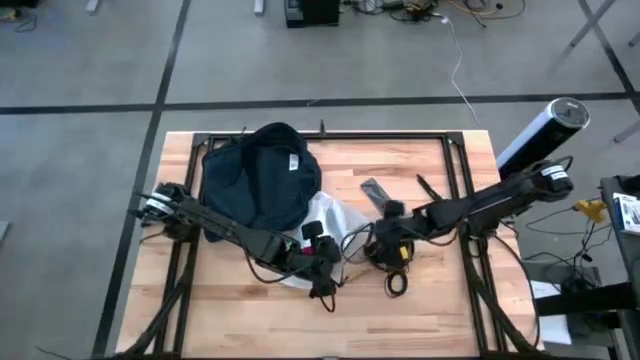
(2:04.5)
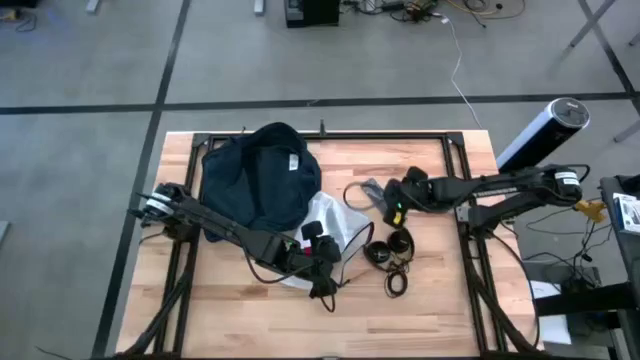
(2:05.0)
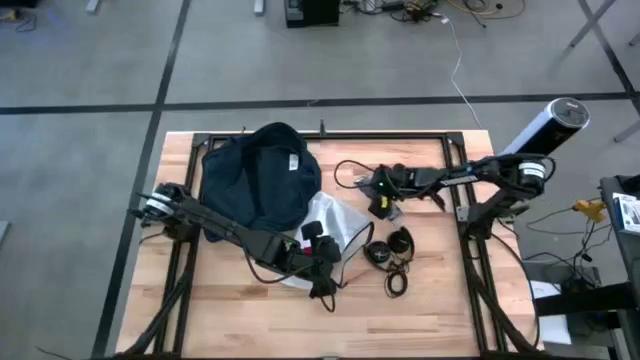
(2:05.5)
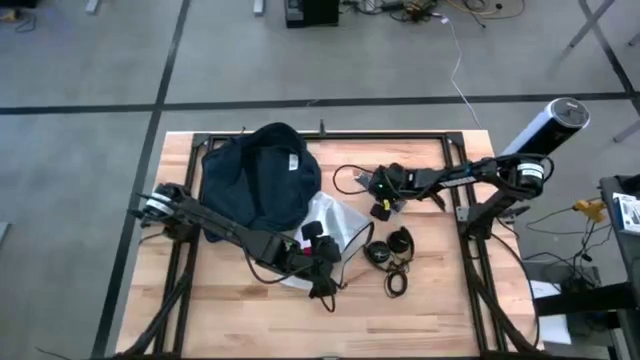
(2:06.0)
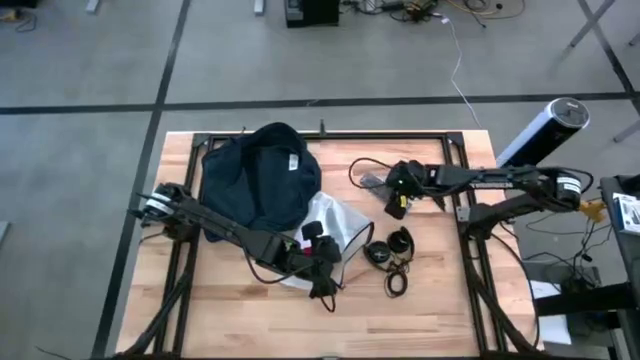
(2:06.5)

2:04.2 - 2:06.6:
Task: Unpack backpack
Put the black paper from the white zipper pouch

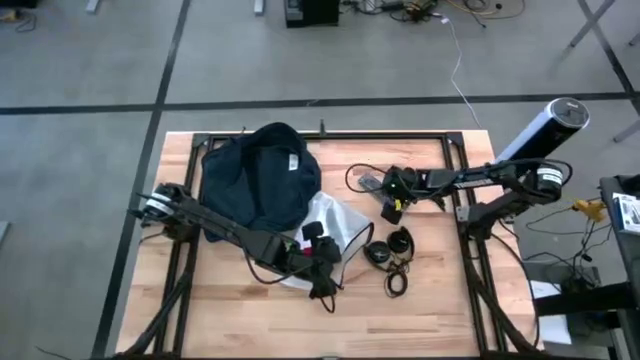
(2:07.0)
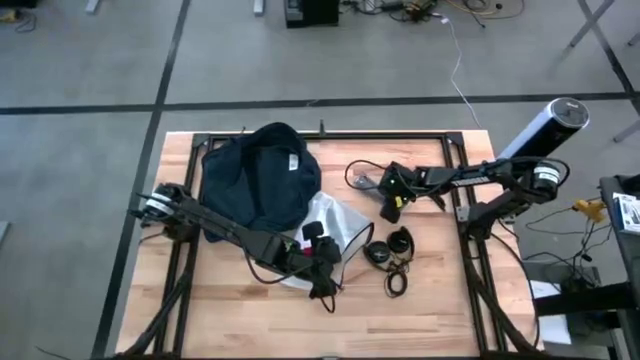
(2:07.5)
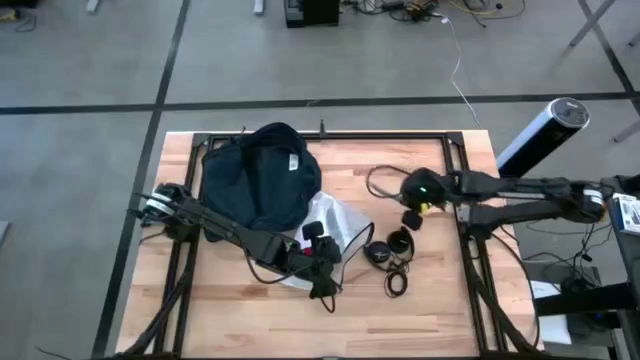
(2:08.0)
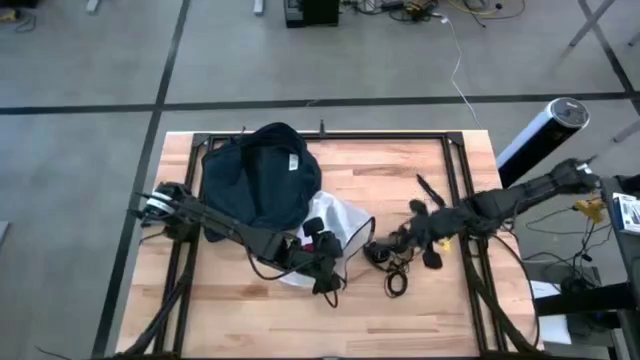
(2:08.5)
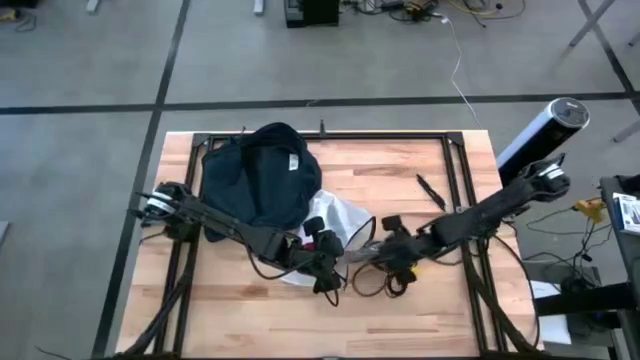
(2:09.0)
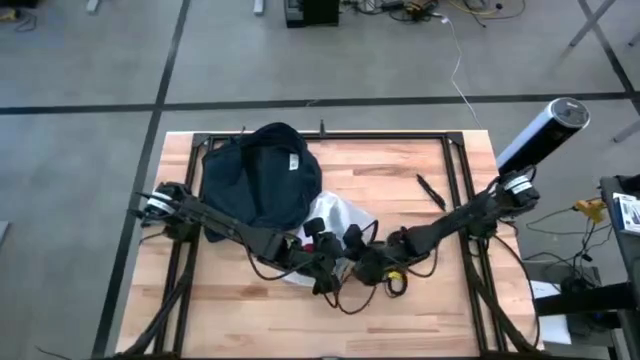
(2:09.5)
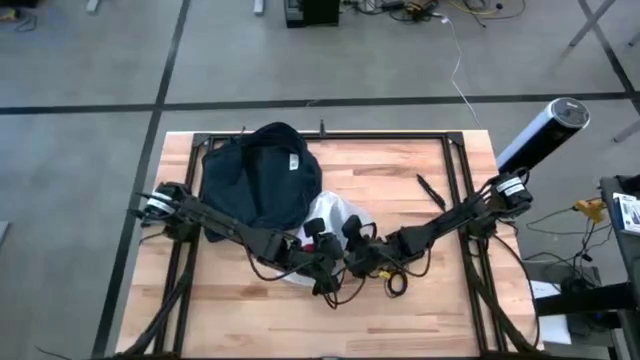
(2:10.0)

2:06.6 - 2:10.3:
Put the black paper from the white zipper pouch

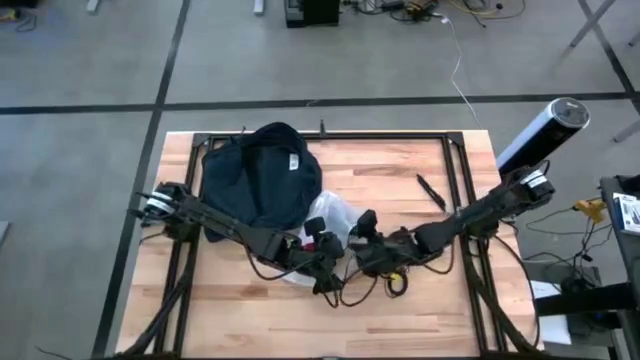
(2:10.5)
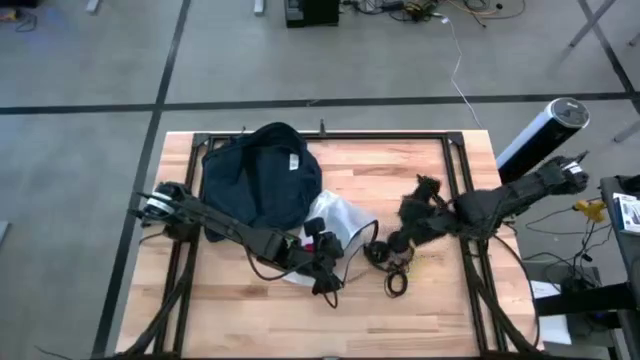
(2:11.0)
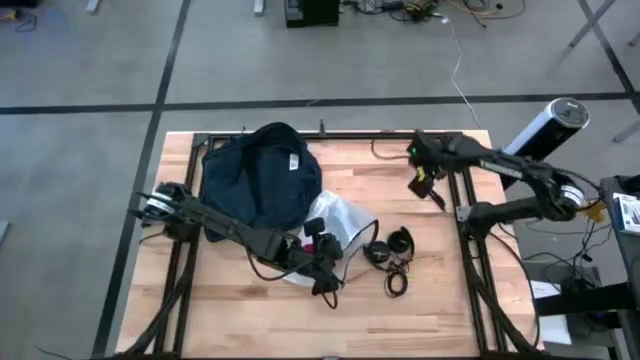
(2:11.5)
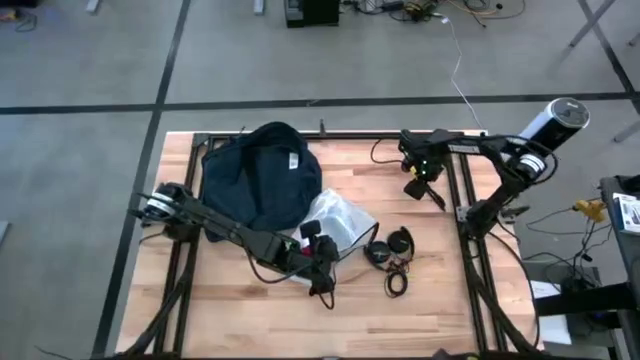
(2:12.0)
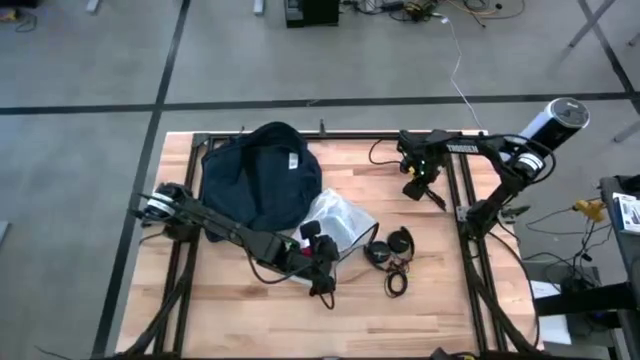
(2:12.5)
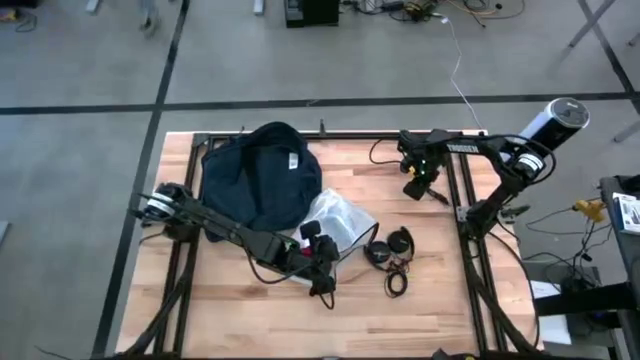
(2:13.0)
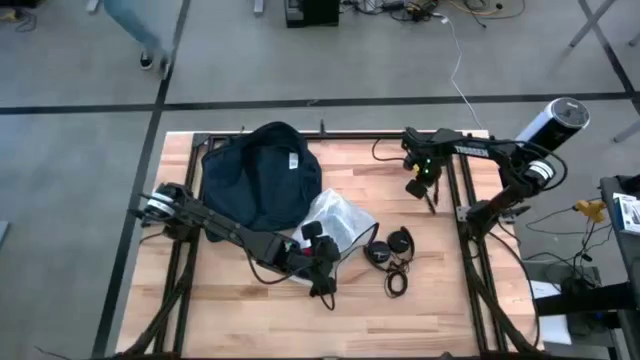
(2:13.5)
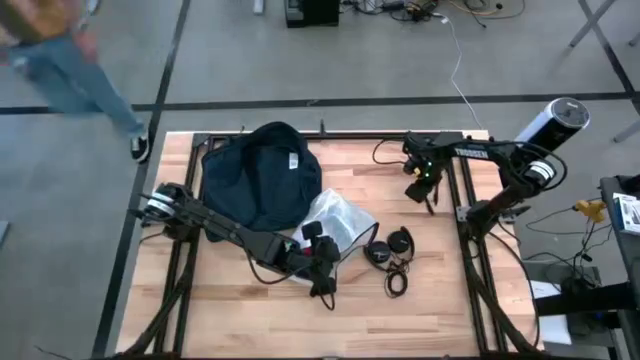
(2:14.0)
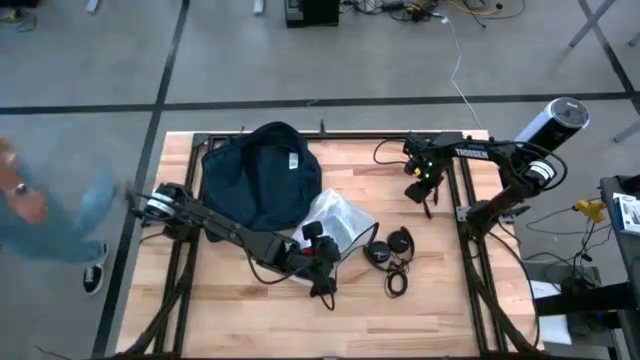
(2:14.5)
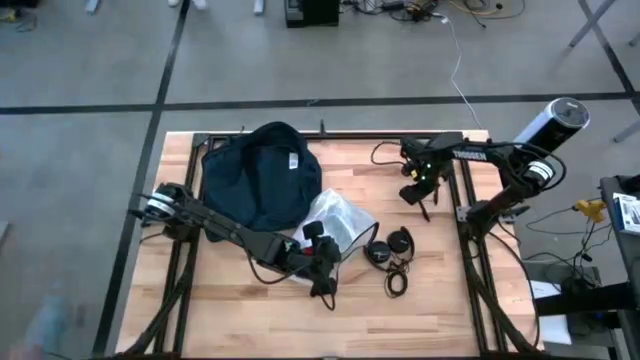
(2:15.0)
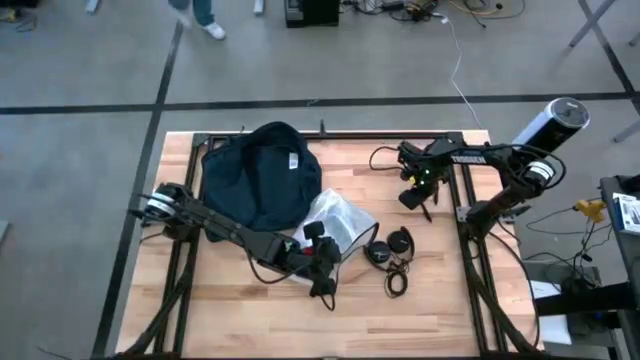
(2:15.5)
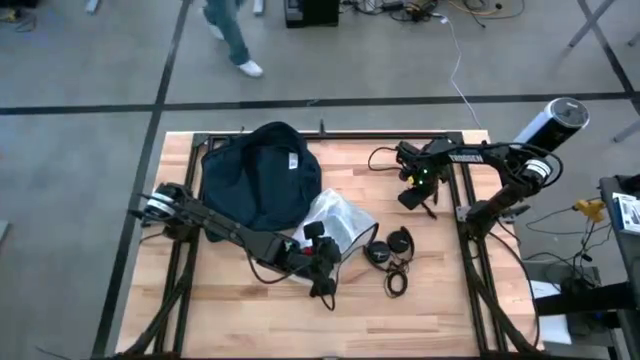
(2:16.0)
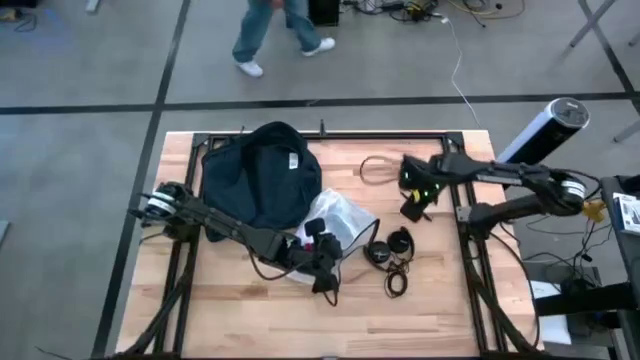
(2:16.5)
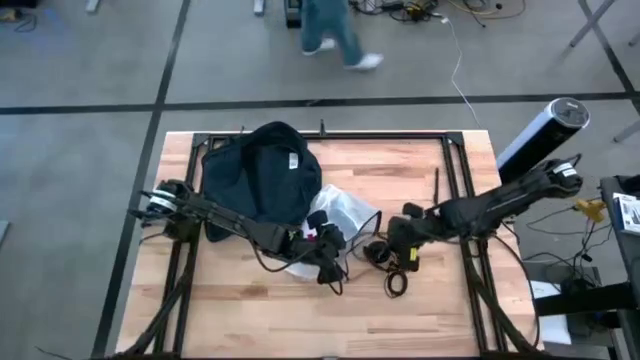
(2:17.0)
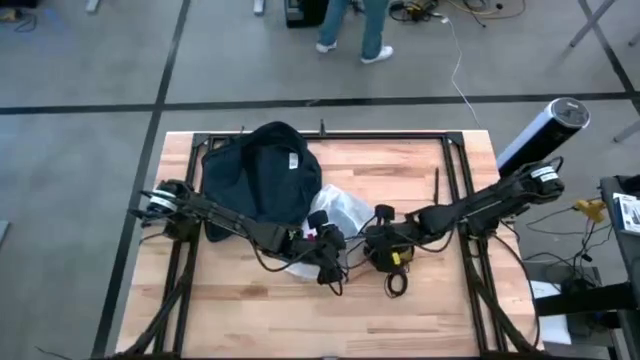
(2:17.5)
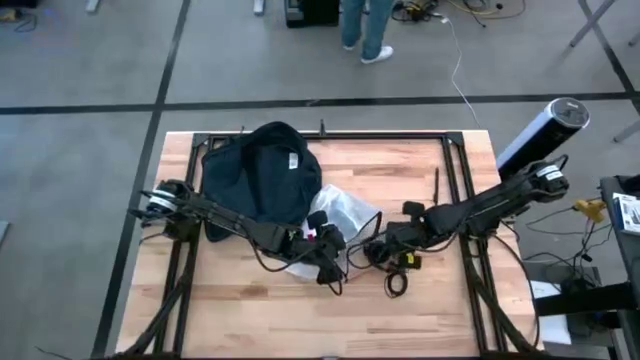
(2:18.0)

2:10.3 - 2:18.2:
Put the black pen into the white zipper pouch

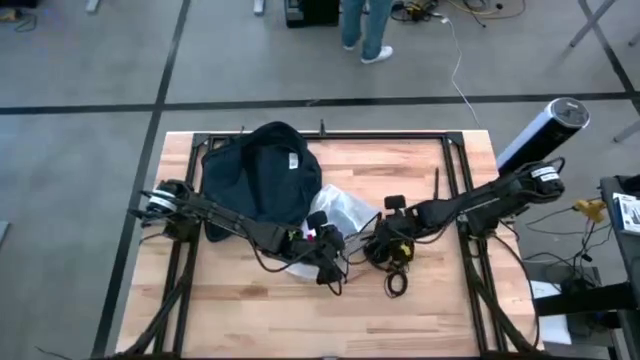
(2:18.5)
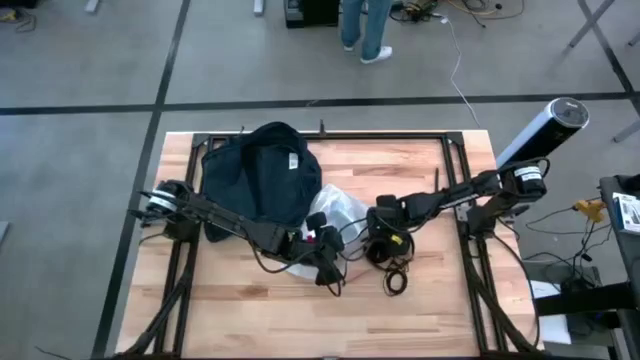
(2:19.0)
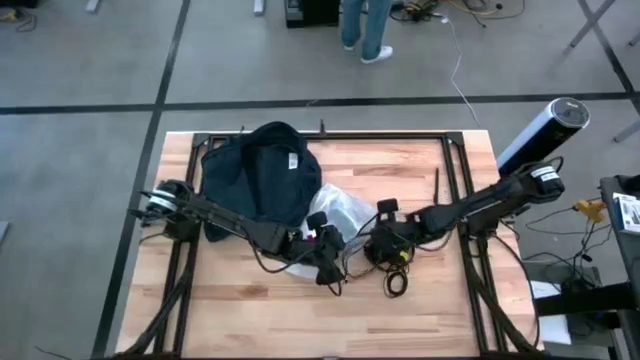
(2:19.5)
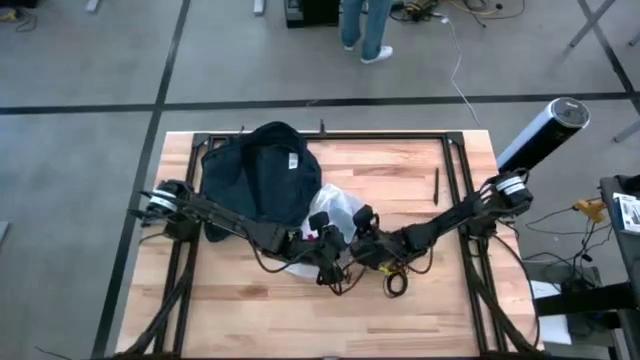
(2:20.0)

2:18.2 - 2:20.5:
Put the black pen into the white zipper pouch

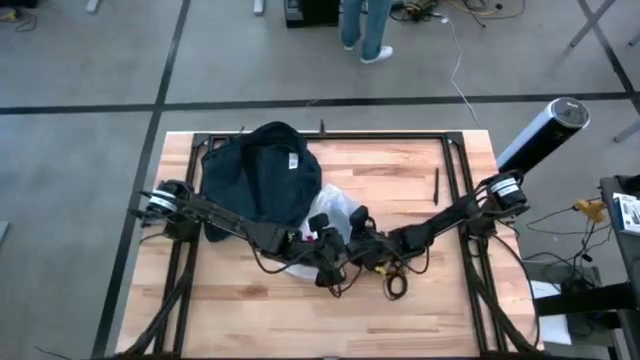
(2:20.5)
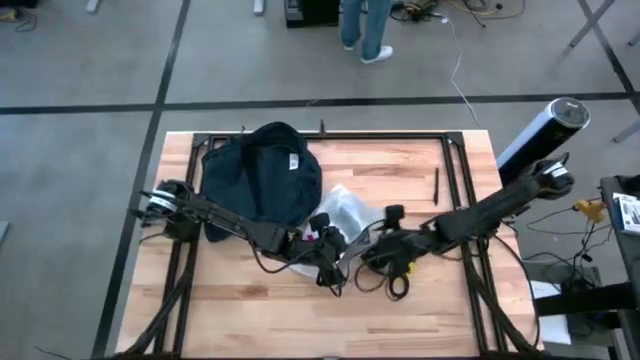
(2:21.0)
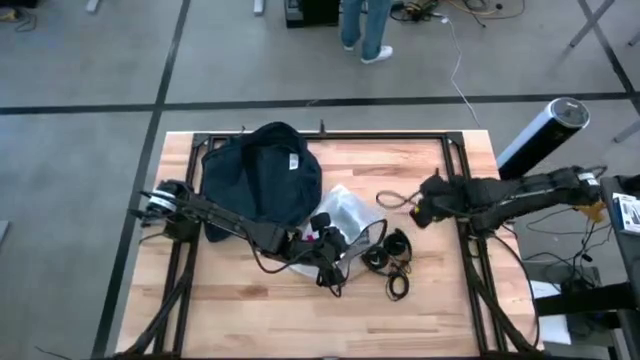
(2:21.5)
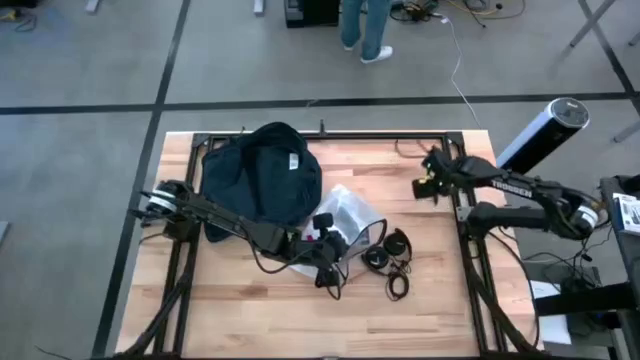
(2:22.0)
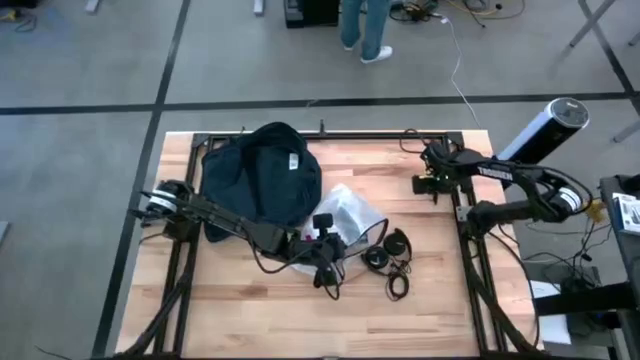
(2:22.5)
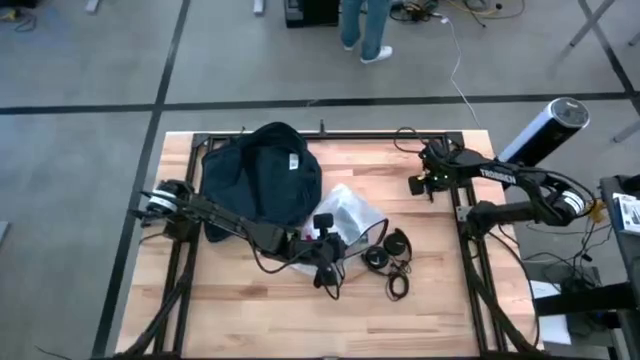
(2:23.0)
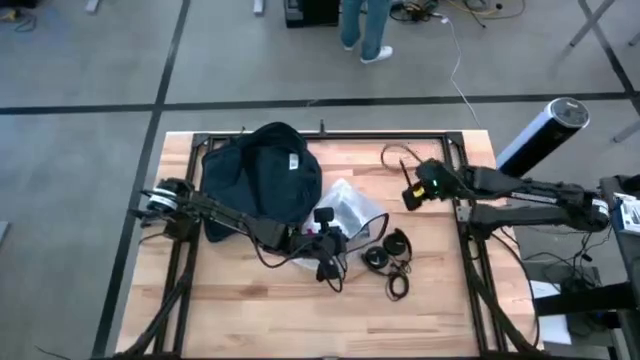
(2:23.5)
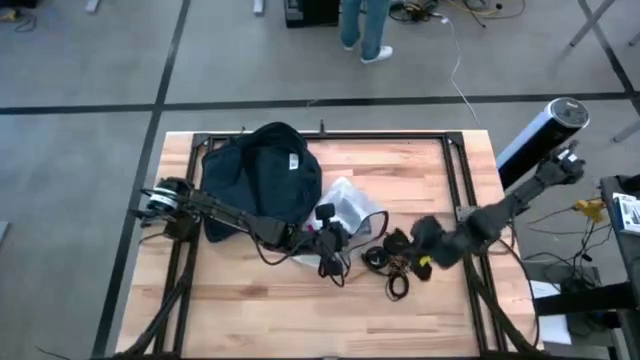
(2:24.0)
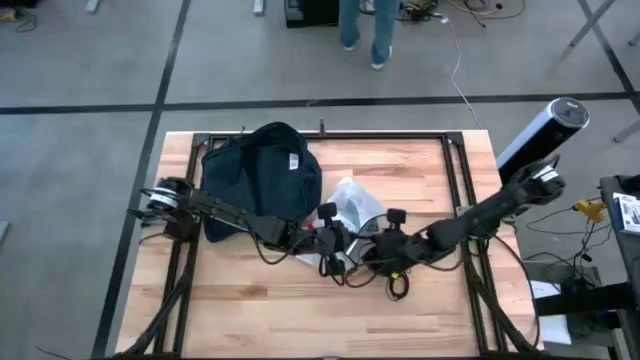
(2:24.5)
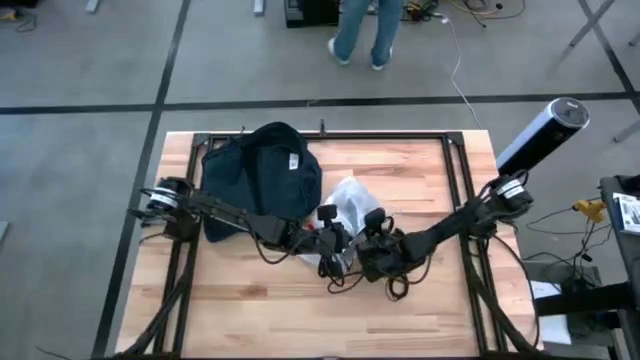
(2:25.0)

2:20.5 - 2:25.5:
Put the black pen into the white zipper pouch

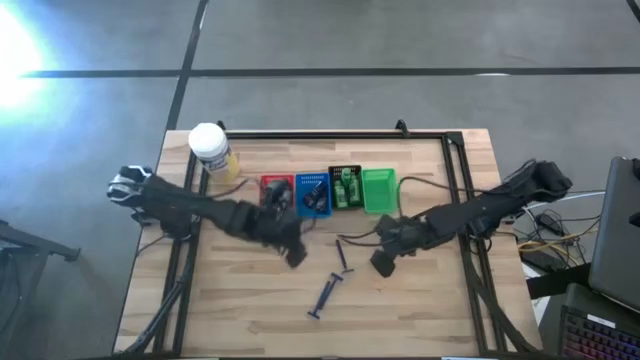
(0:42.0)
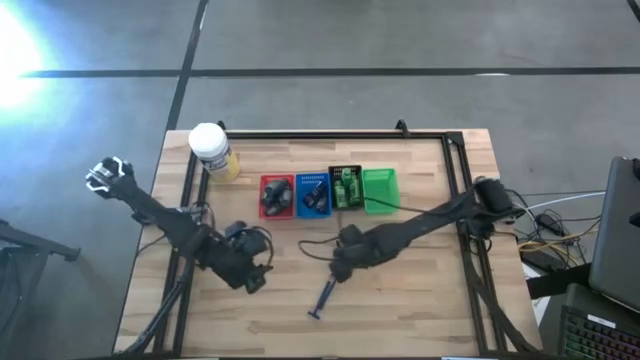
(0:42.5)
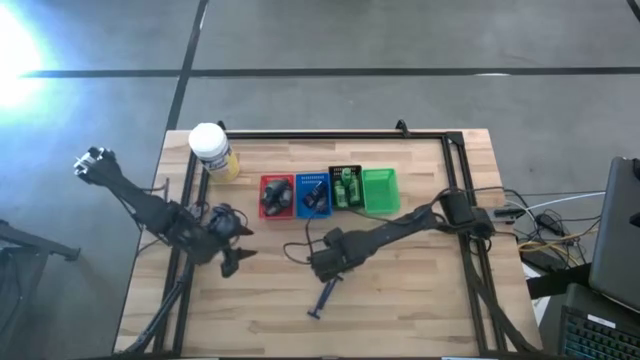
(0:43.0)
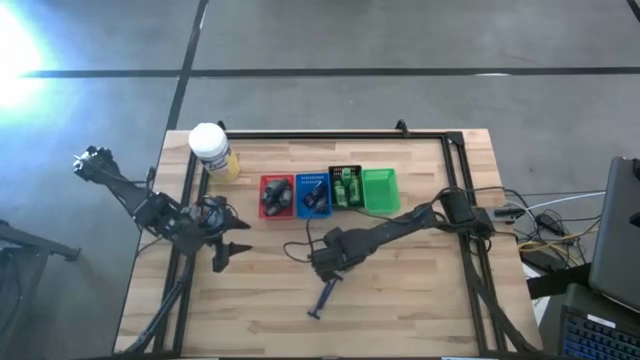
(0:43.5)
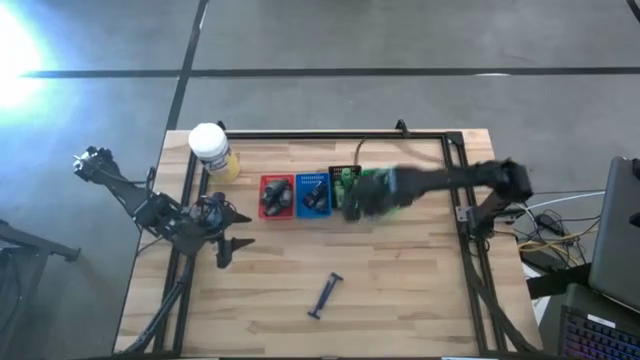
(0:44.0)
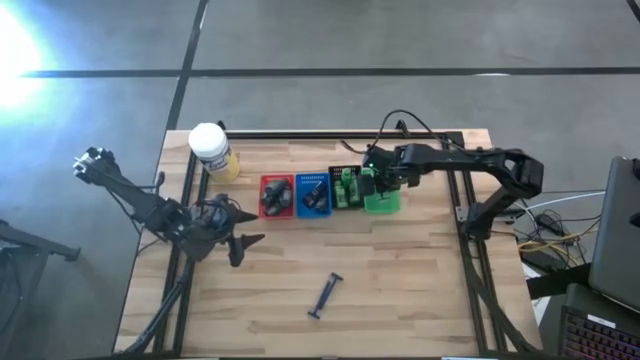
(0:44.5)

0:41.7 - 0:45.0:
Task: Pick & Place Travel size toiletries
Put the blue razor into the green bin
